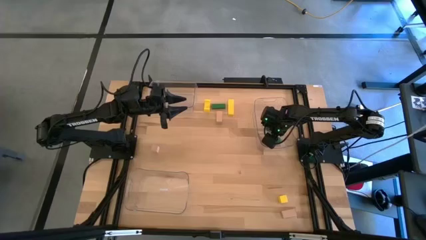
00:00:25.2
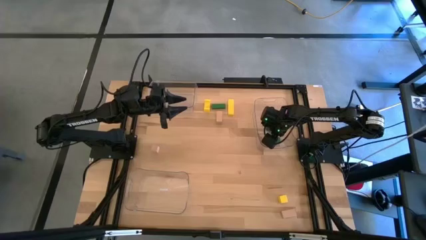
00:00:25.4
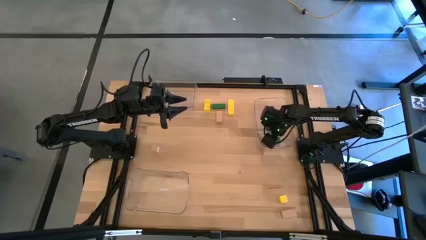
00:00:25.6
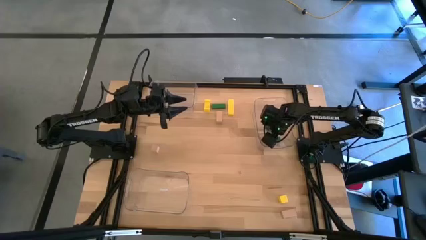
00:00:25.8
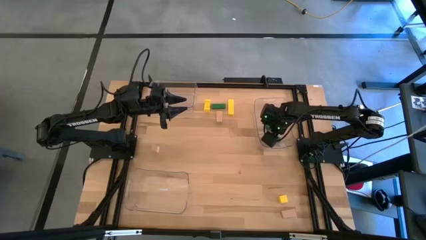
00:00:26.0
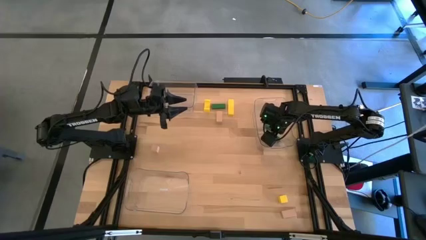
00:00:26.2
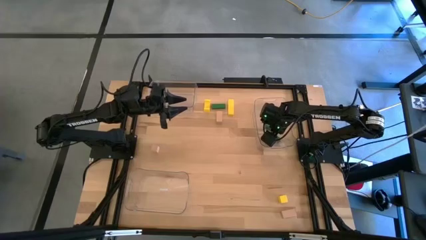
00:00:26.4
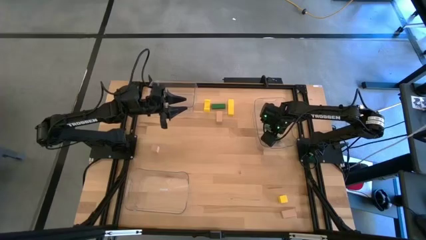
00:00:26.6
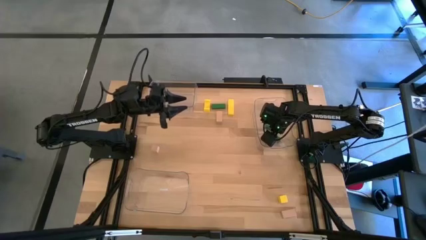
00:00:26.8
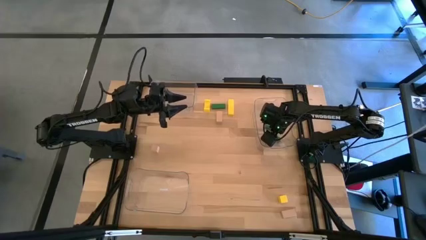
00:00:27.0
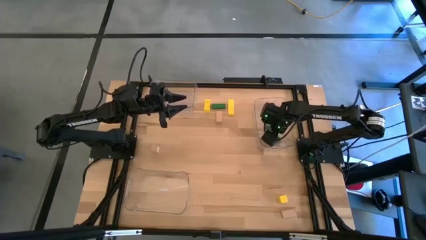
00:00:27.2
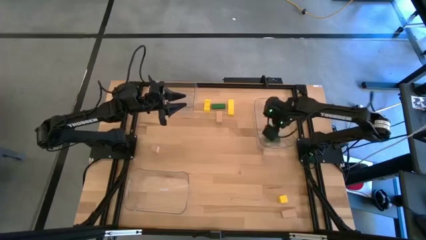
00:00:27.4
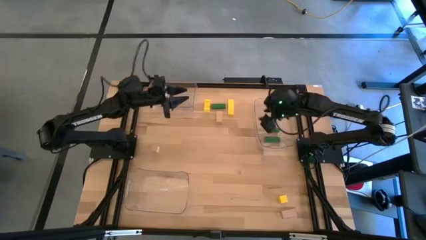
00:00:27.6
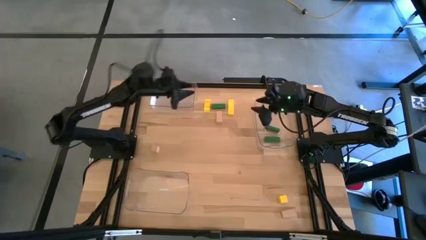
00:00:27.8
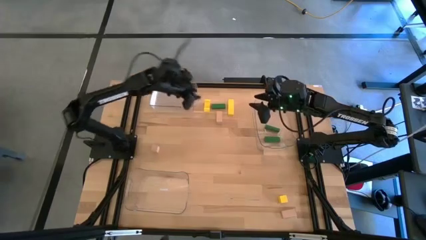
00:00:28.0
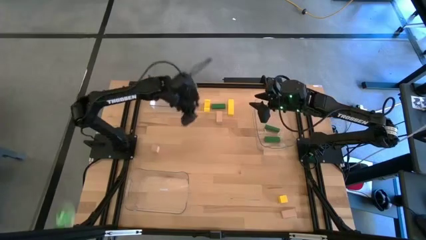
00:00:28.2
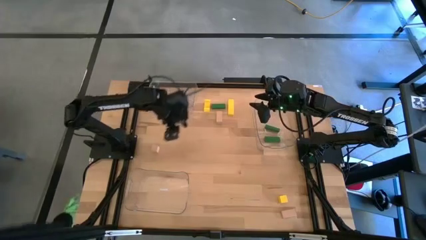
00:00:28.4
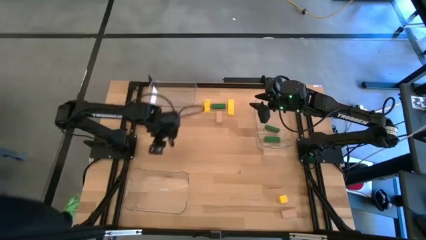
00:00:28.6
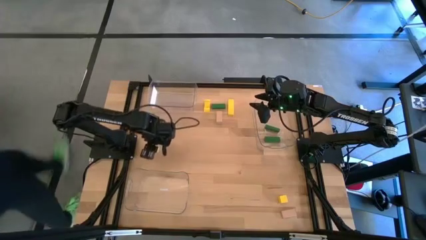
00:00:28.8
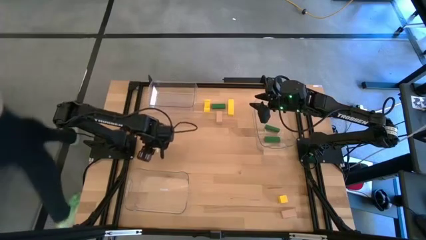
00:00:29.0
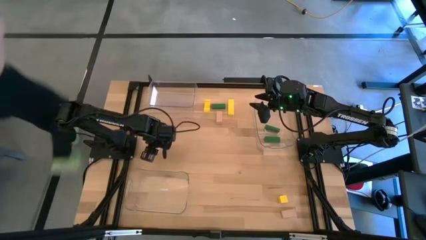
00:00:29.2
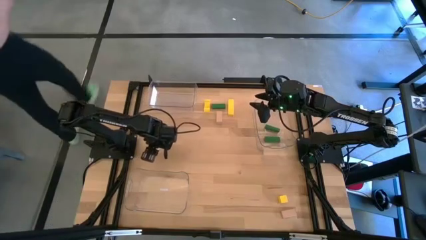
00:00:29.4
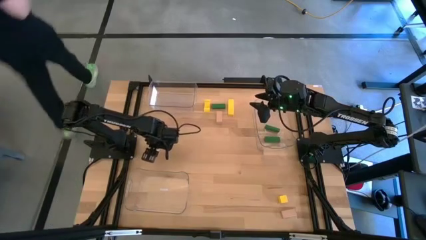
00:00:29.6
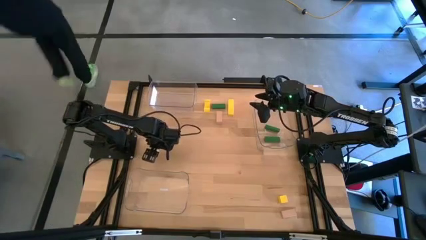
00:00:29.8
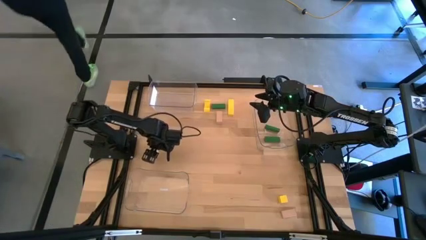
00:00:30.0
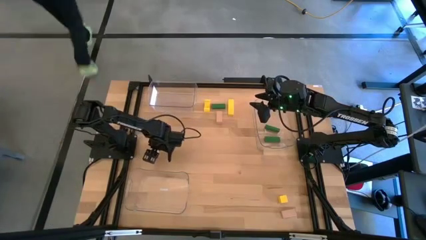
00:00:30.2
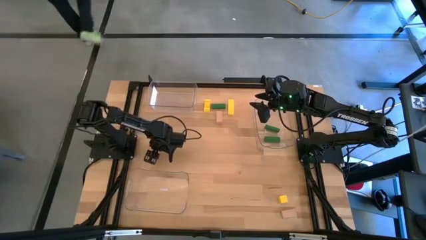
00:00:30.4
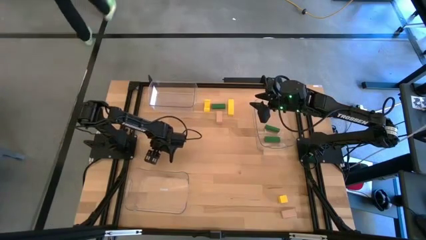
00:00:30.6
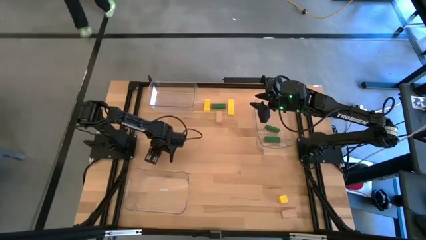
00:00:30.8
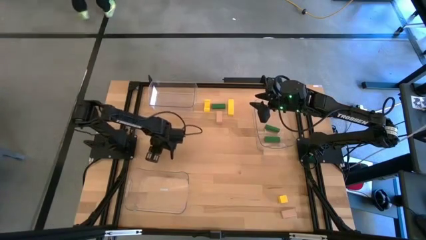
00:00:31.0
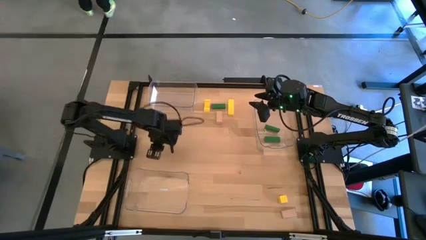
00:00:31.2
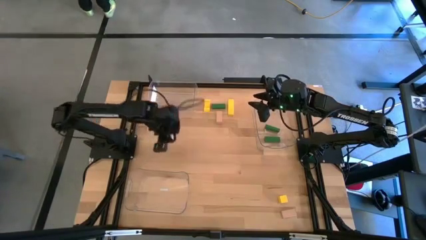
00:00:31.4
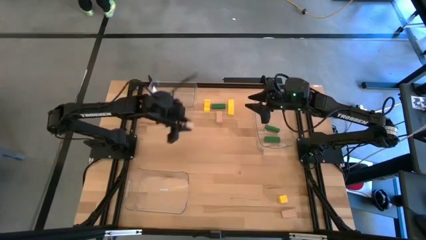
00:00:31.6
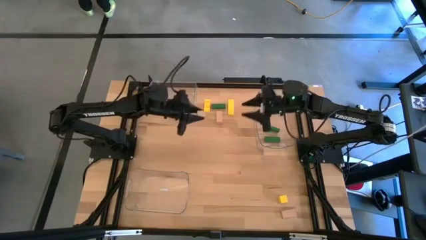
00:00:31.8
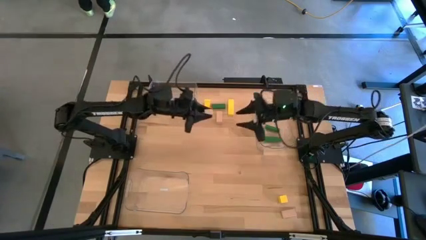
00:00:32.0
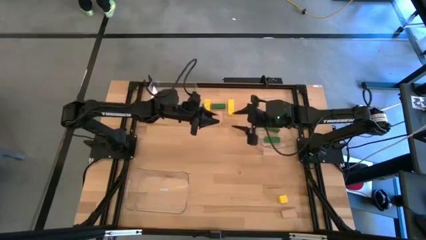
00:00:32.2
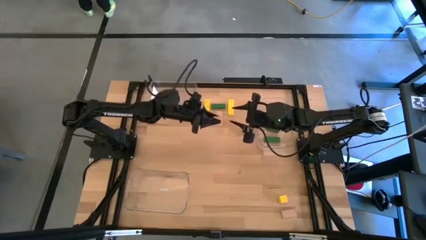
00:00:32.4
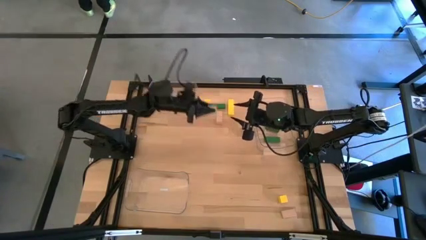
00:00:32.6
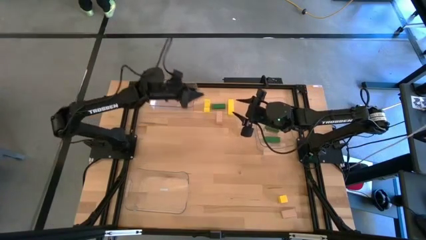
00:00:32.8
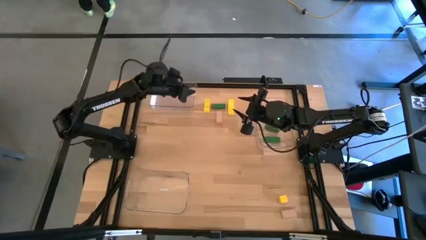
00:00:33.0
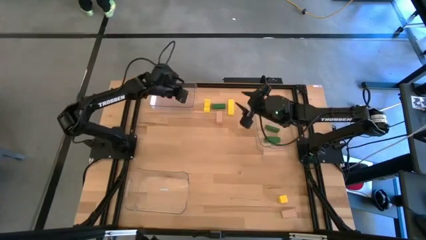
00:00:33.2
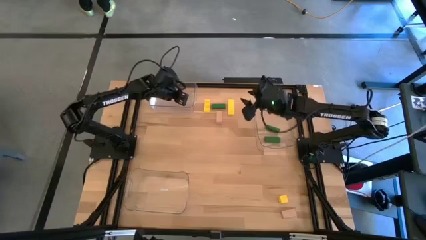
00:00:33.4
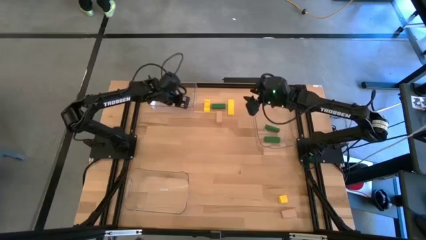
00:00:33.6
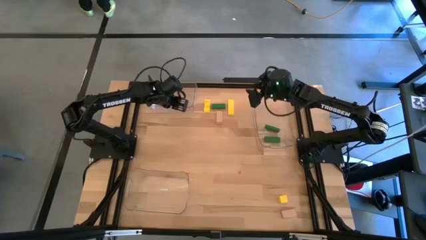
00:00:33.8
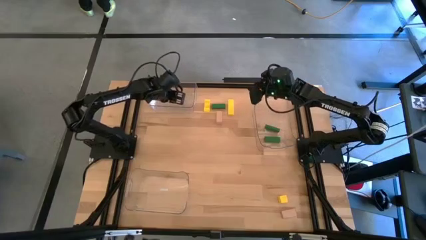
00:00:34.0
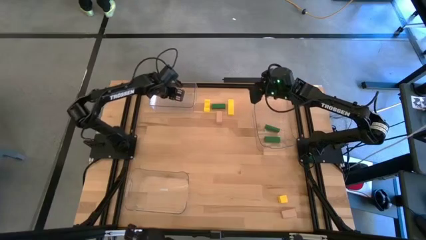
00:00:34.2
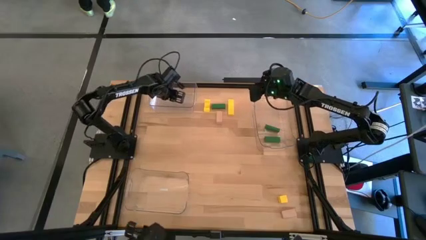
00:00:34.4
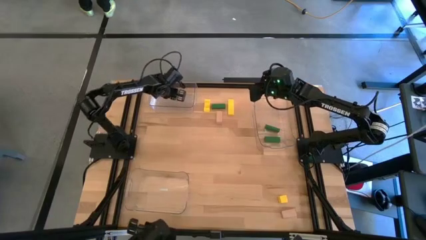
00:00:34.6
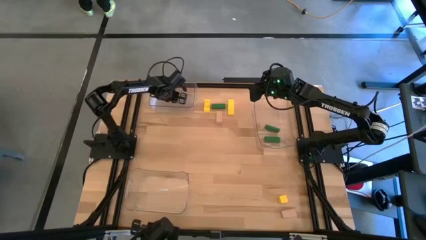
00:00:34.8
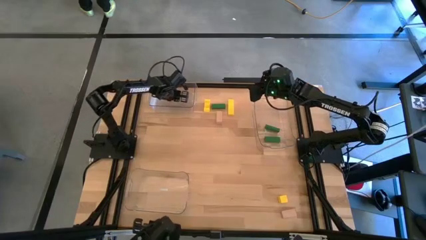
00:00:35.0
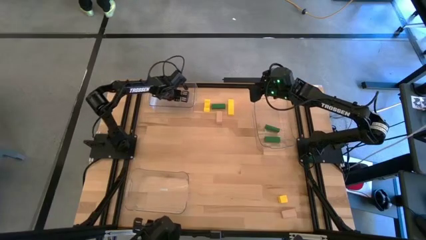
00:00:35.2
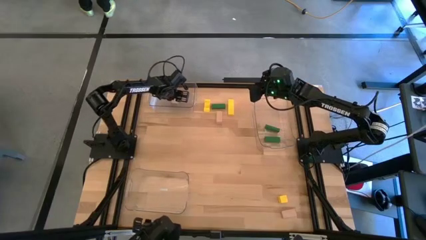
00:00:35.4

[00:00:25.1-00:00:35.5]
Task: Sort & place blocks by color
Put the middle left brown block into the top left transparent bin

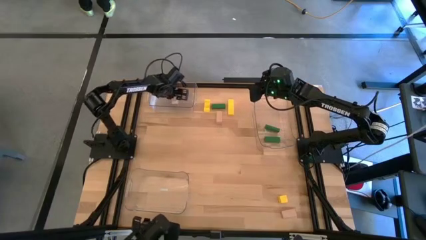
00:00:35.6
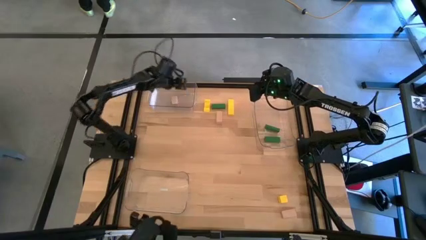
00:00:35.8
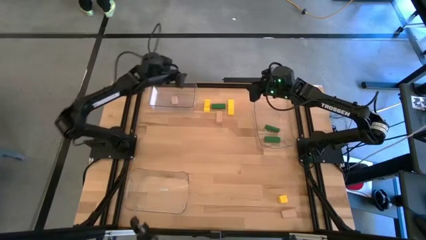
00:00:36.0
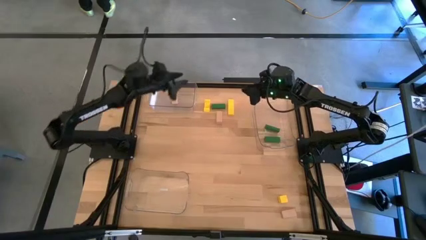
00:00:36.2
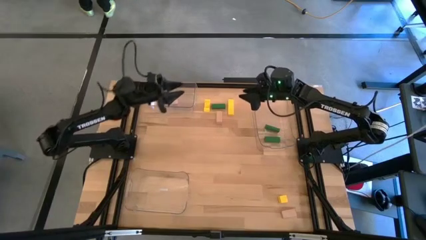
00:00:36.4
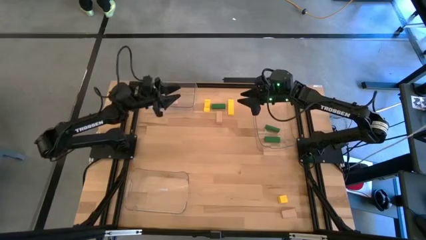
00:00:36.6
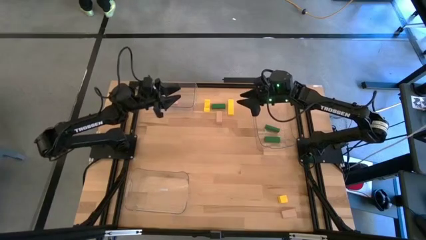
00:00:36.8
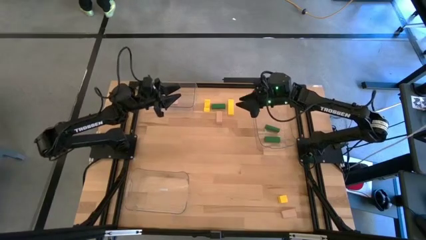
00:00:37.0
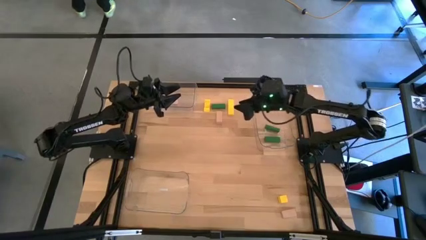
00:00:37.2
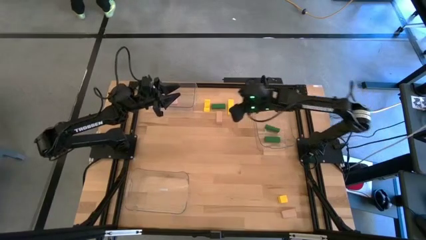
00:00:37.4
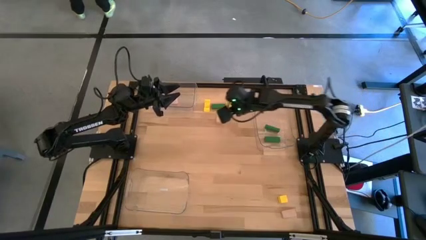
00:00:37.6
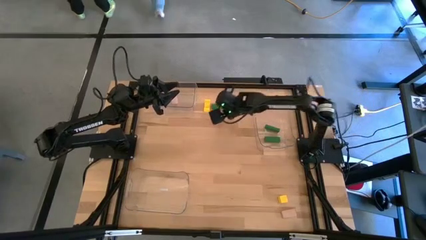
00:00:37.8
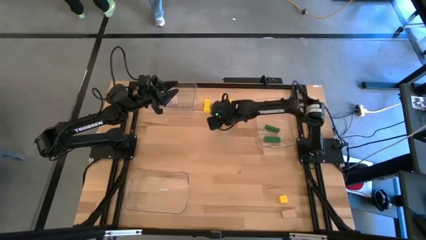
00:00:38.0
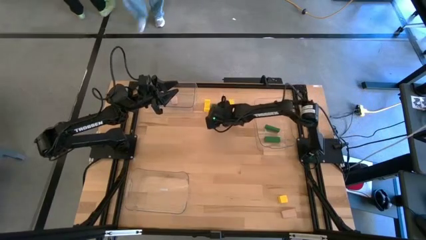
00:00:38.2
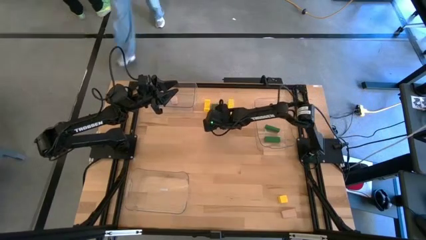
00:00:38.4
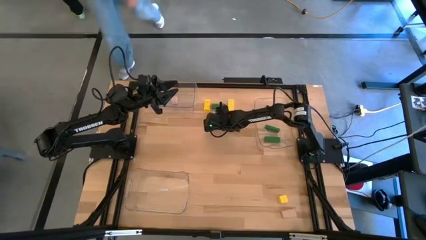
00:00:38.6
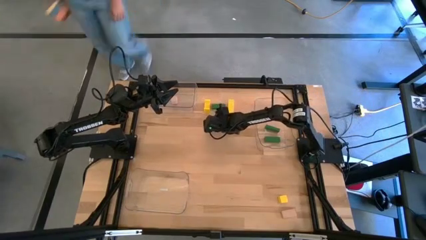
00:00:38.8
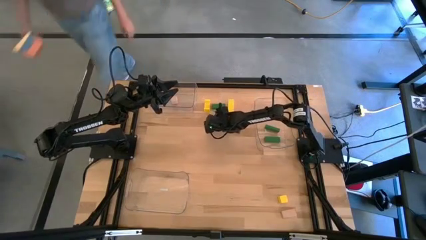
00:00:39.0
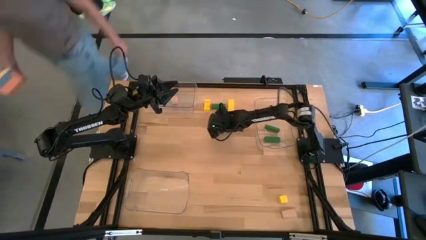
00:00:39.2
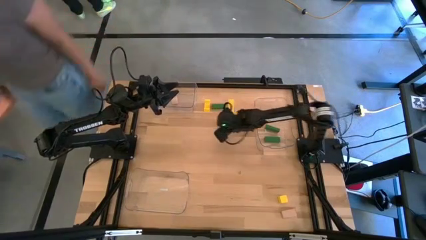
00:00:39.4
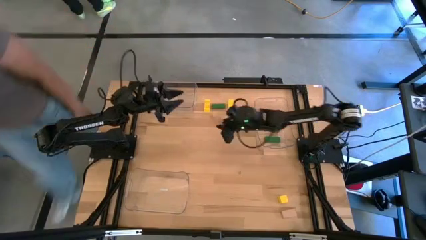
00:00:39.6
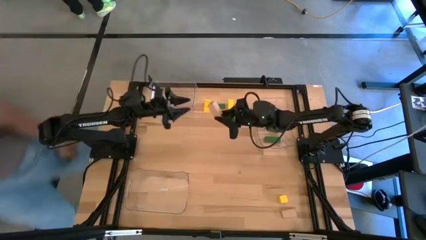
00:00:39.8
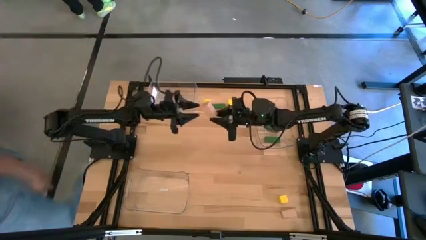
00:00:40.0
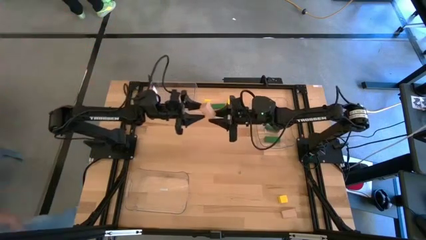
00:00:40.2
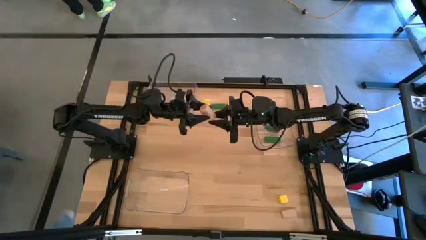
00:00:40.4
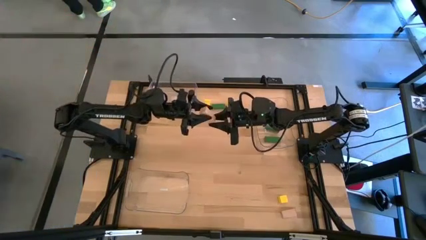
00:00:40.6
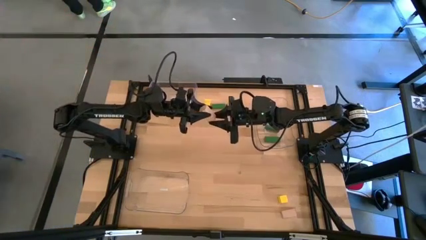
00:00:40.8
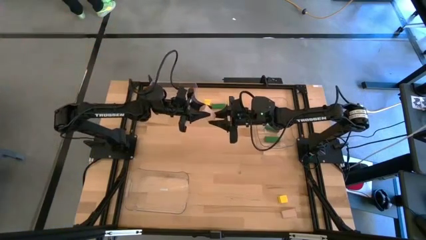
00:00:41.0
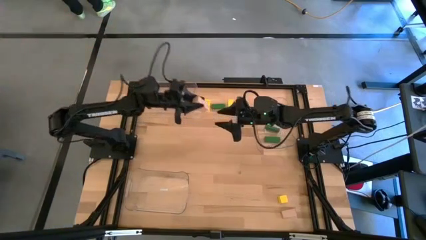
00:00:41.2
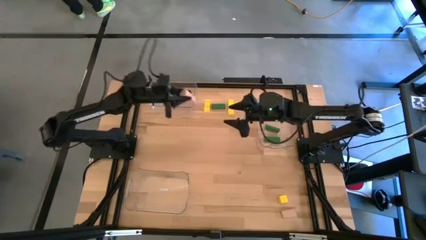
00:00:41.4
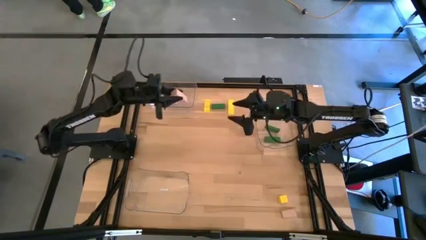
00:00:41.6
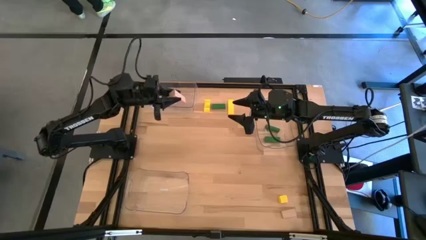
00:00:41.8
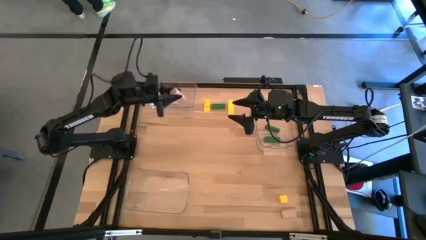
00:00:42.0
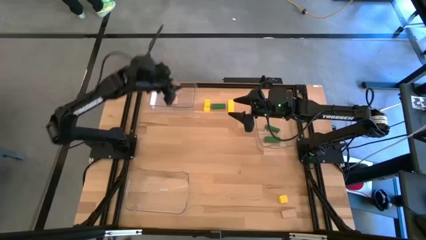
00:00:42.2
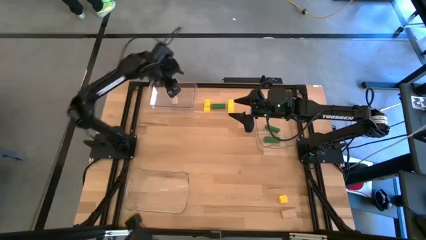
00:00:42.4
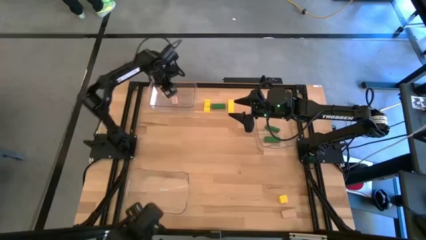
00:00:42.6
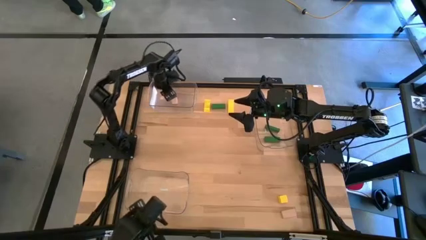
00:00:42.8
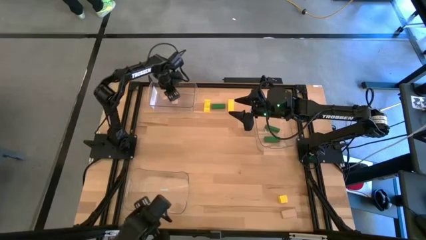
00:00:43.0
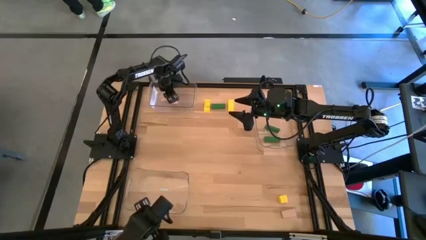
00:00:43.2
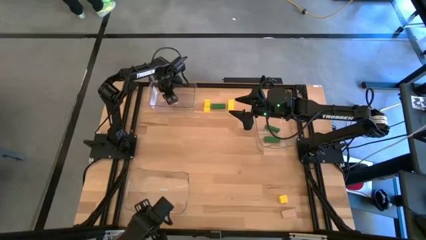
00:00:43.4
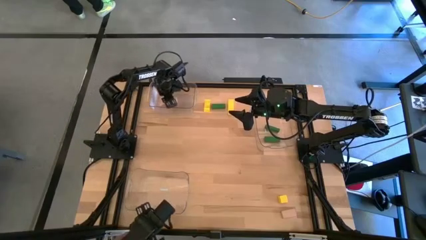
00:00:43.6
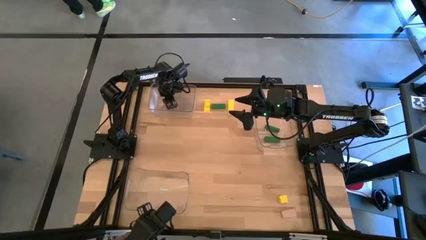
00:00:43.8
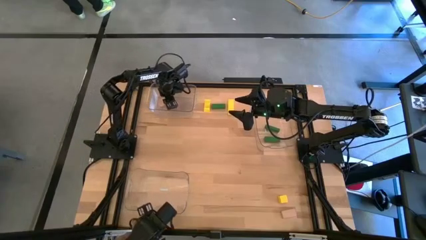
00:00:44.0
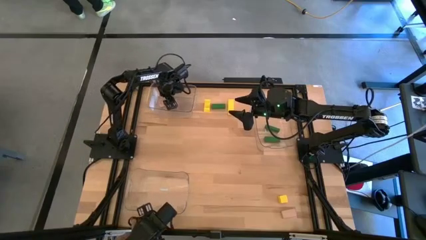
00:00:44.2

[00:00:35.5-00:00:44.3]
Put the top block into the top left transparent bin
